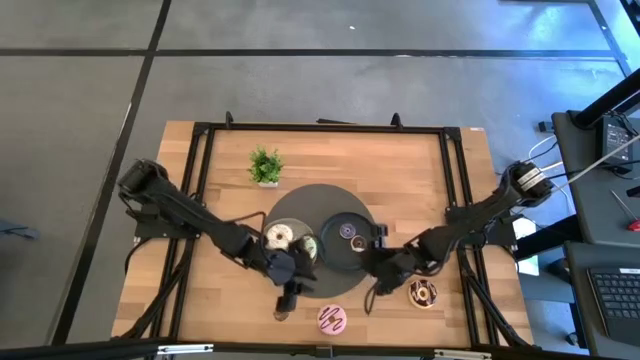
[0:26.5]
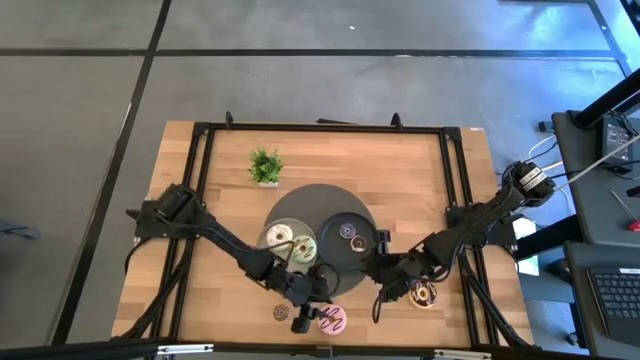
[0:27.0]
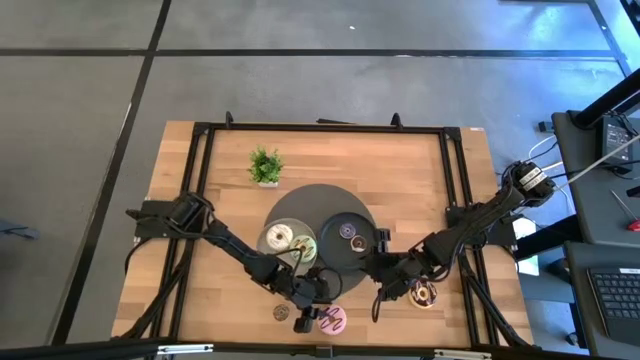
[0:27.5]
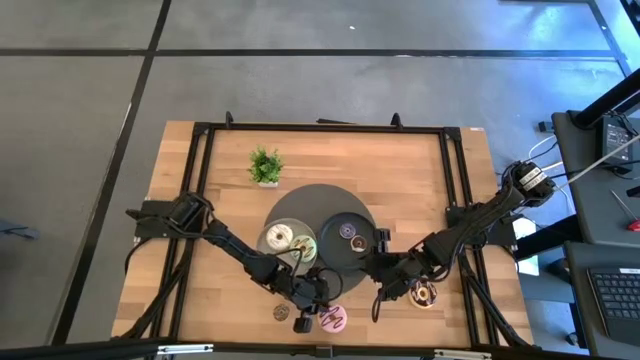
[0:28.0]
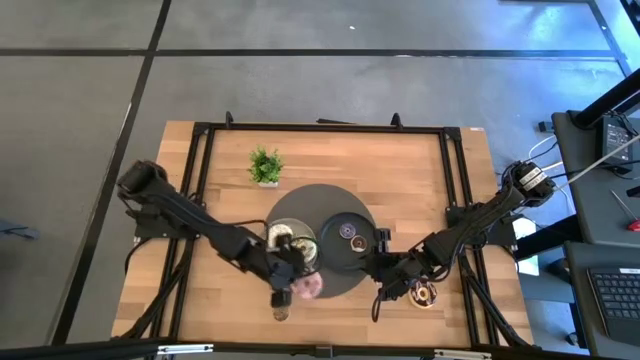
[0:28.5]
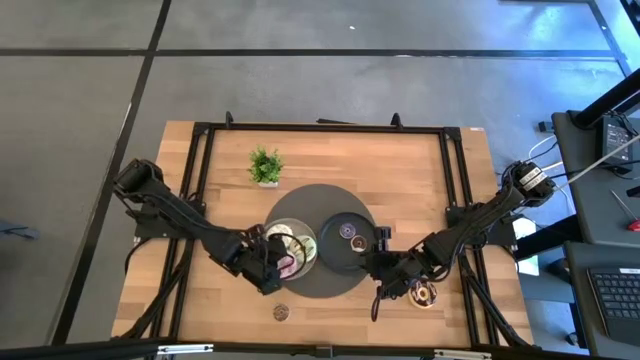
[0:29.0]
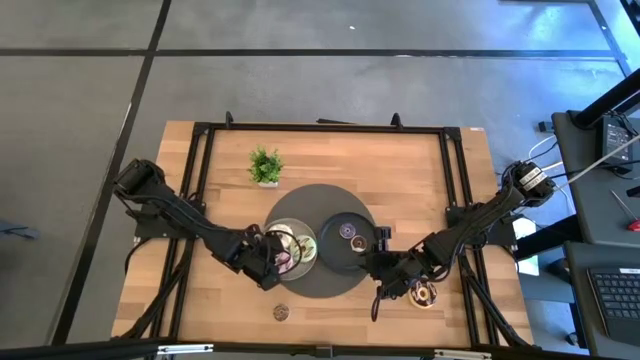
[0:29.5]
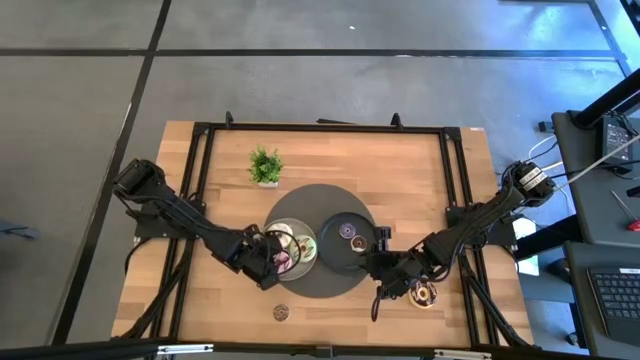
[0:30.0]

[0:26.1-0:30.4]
Task: Pick & Place donuts
Put the large pink donut on the gray plate

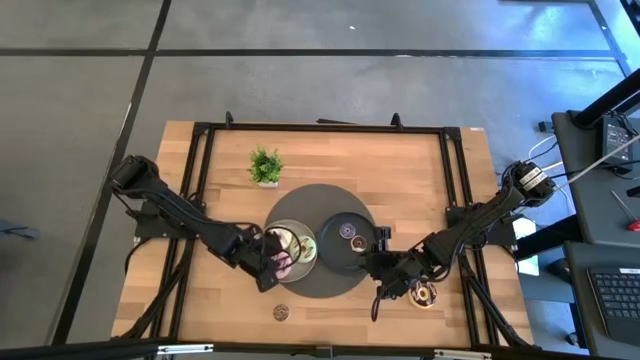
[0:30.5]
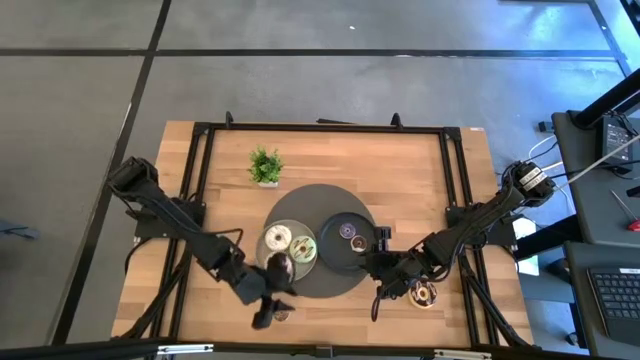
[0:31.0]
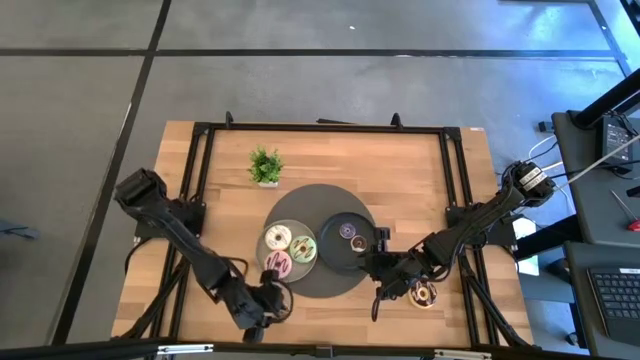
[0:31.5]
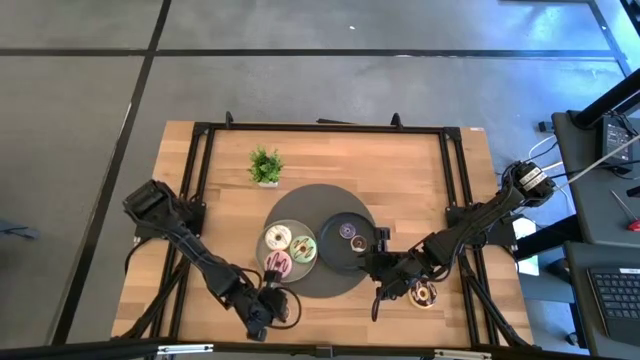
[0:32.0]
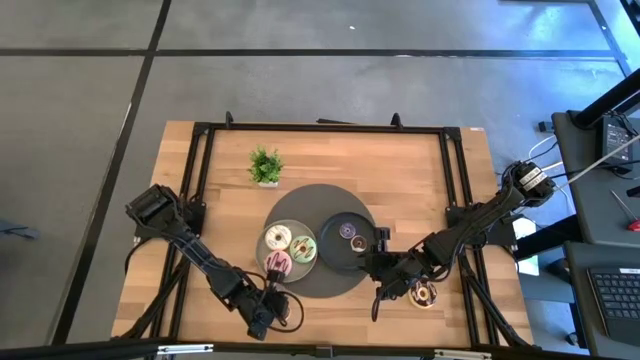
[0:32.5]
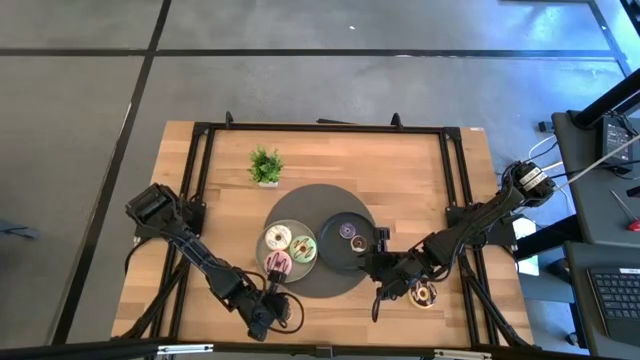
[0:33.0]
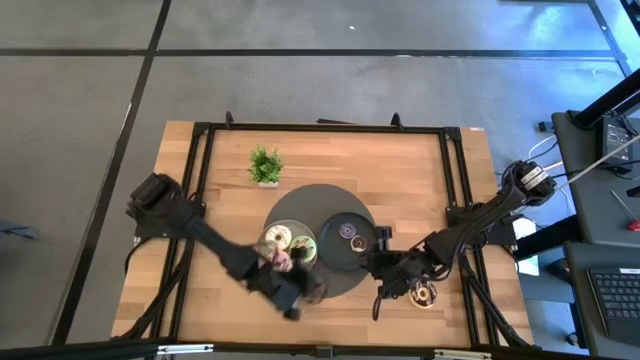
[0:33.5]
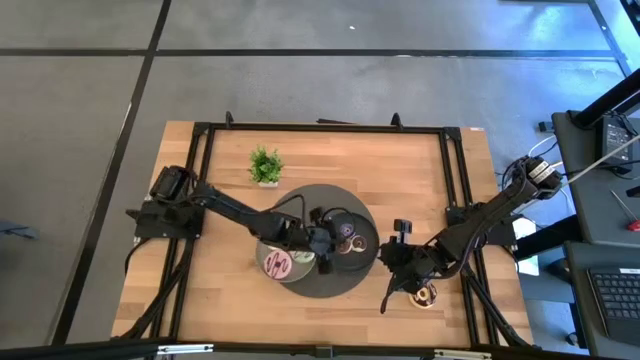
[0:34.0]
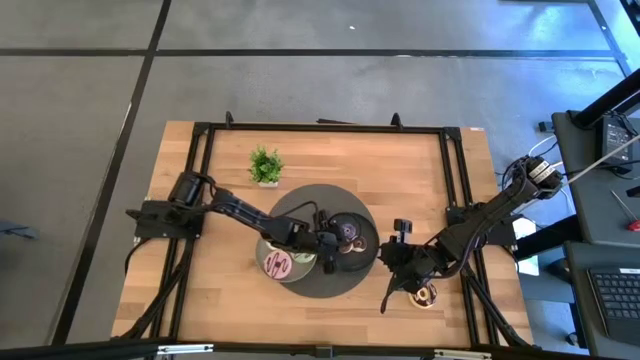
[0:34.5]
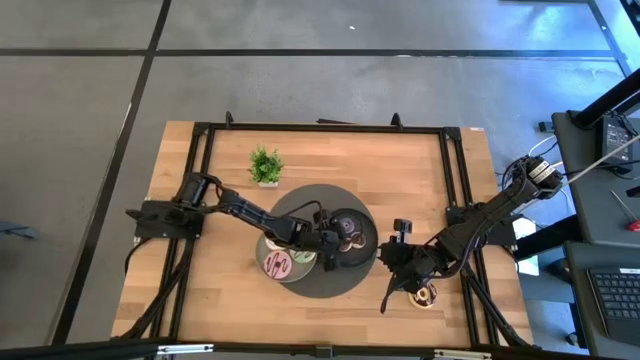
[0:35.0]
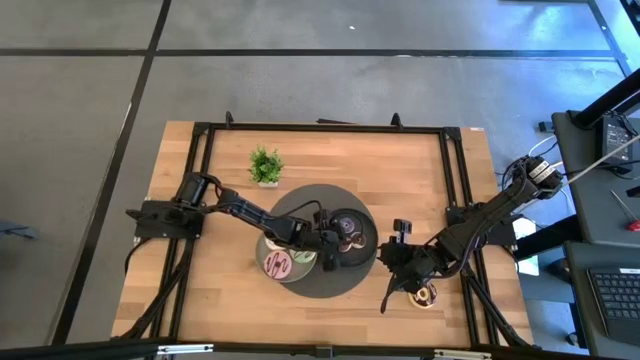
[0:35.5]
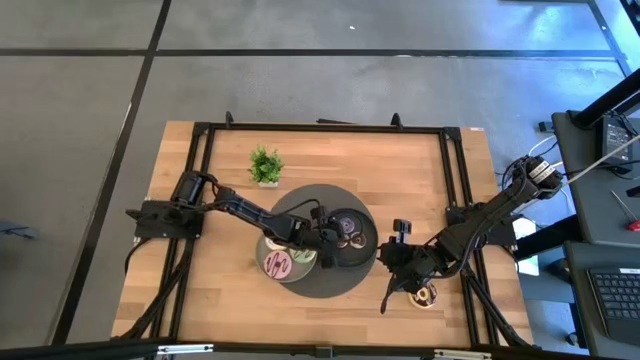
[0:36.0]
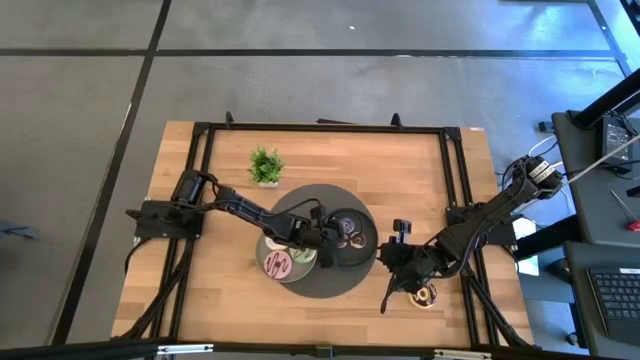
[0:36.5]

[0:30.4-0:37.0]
Put the small brown donut on the black plate

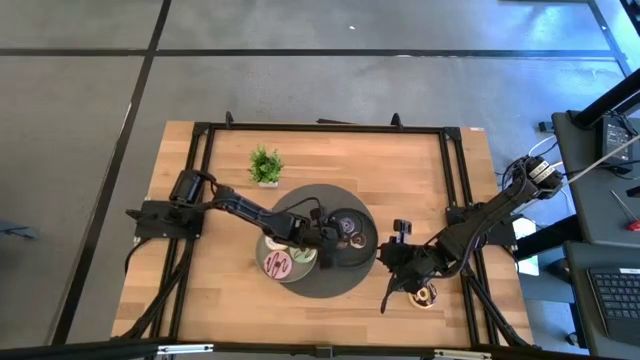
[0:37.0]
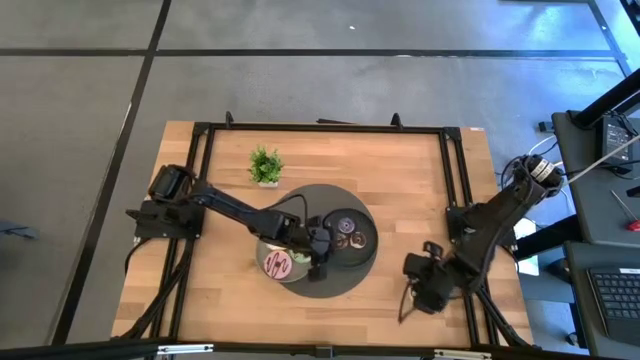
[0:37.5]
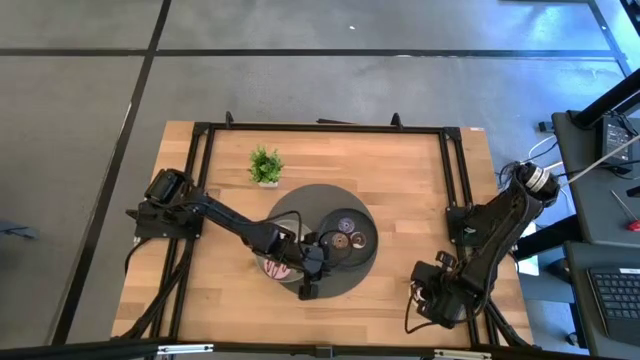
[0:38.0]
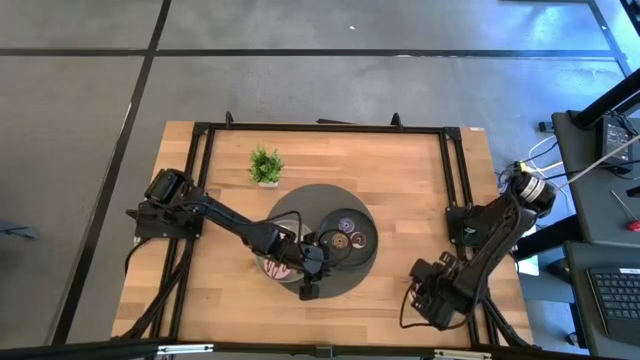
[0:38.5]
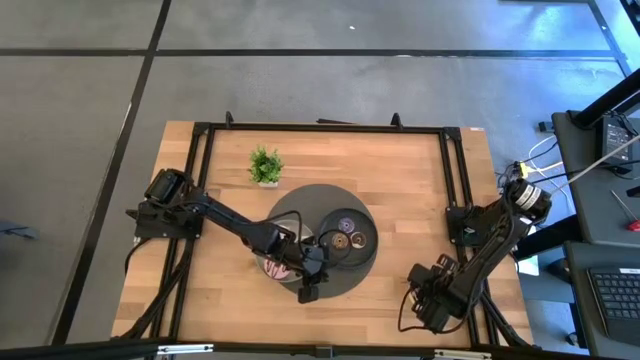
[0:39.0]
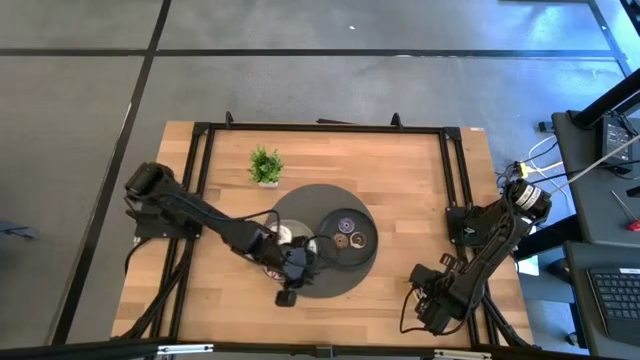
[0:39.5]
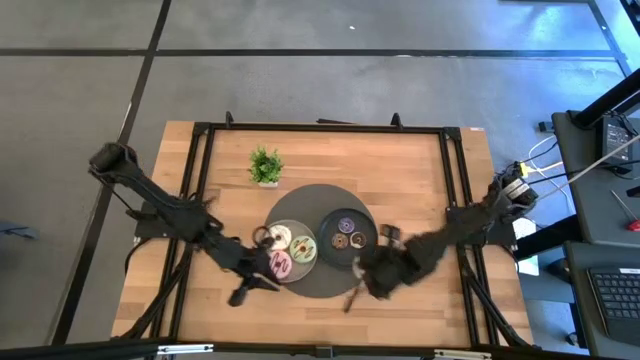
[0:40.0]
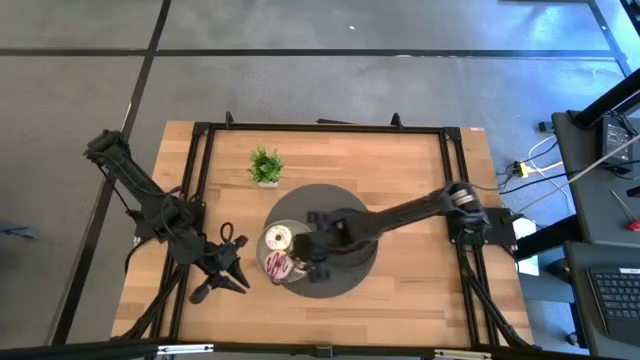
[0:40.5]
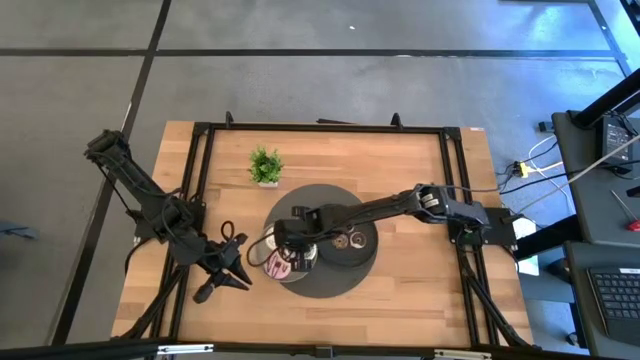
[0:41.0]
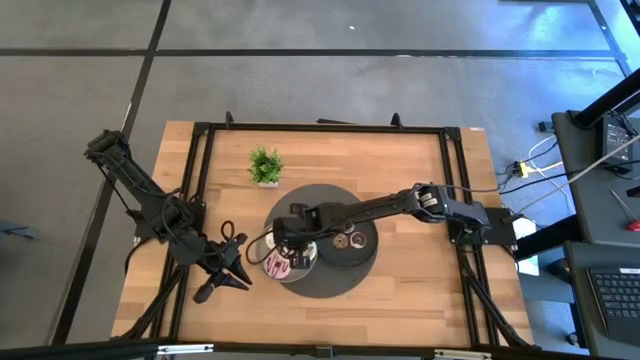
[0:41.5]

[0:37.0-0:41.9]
Put the large black donut on the gray plate

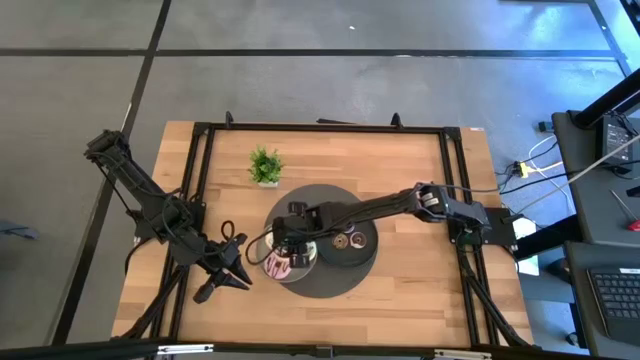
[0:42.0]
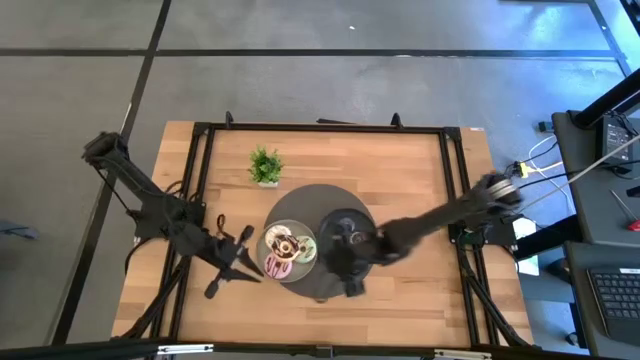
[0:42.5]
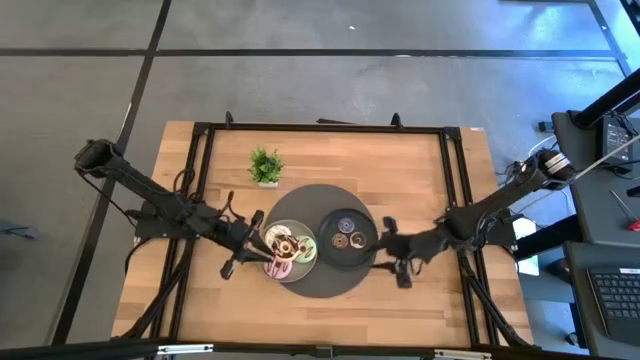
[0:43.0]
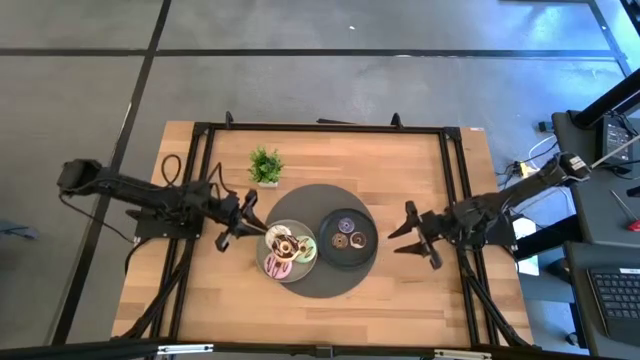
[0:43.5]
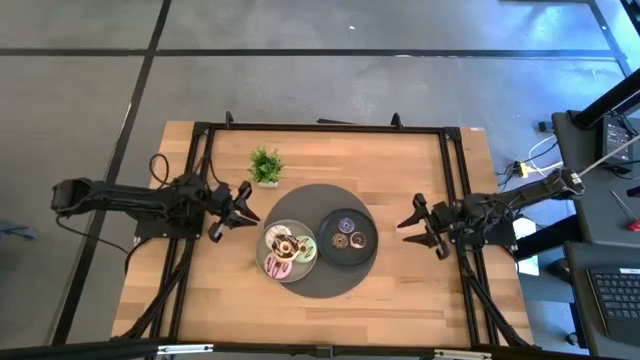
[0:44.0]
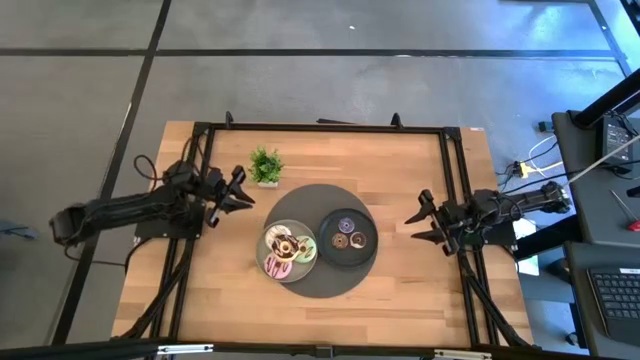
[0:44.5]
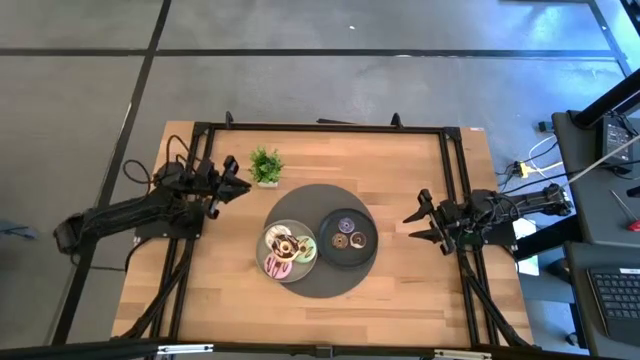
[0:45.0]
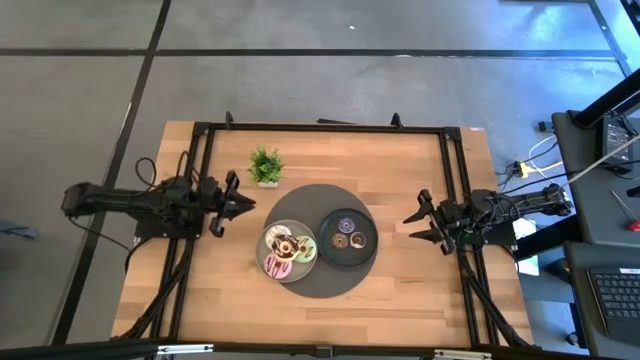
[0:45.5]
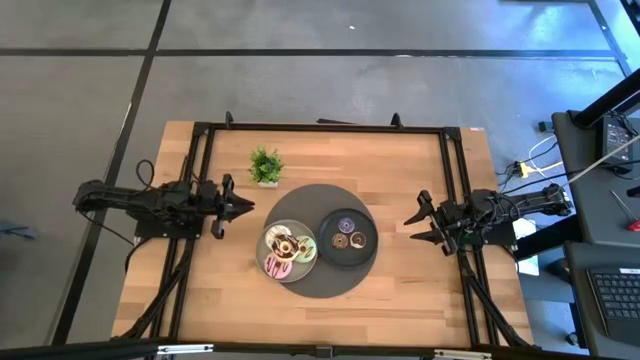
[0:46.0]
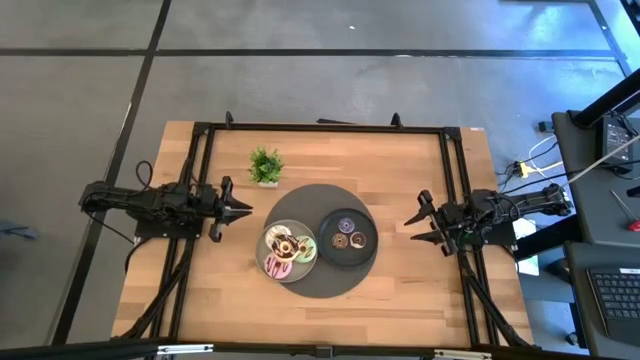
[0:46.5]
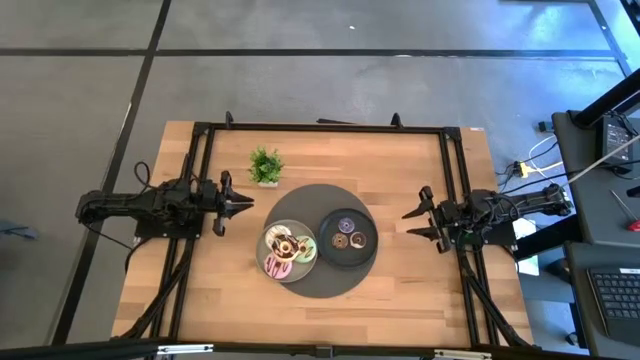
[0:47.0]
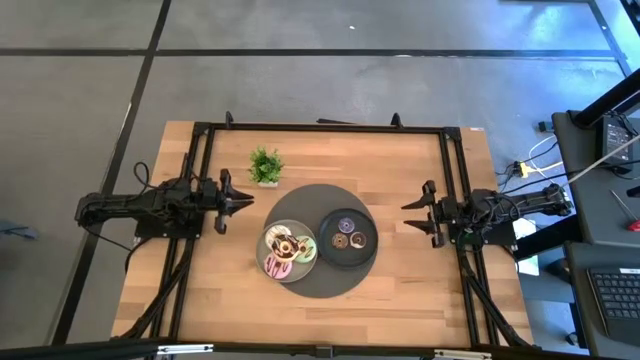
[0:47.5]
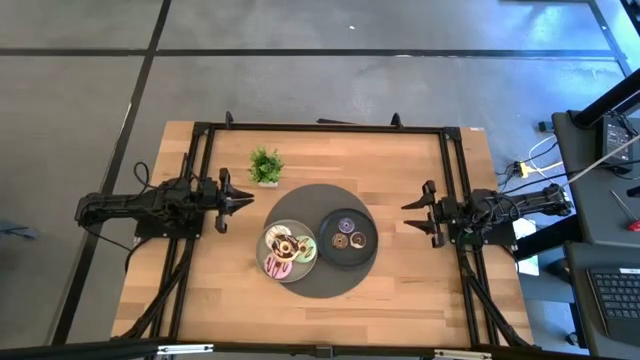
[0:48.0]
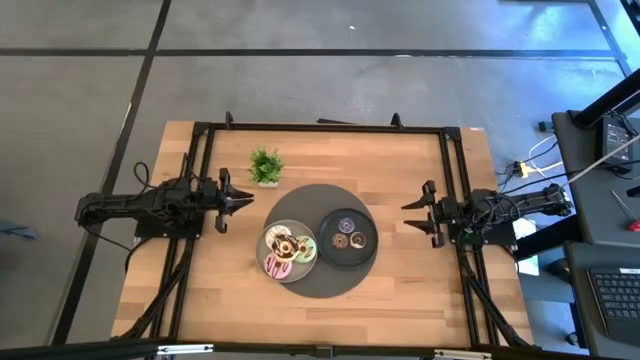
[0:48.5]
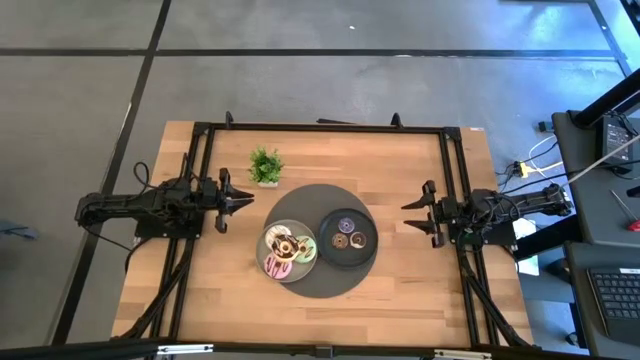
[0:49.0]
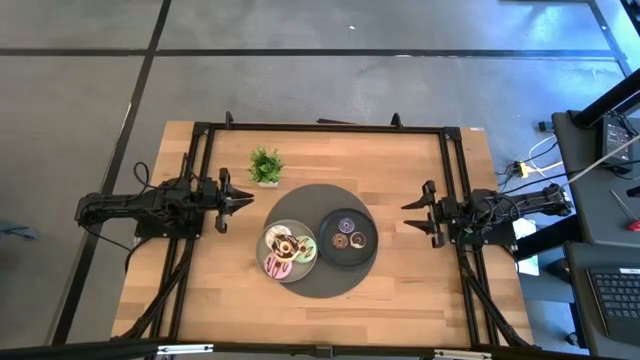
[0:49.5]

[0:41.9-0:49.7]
Return to Home Position
